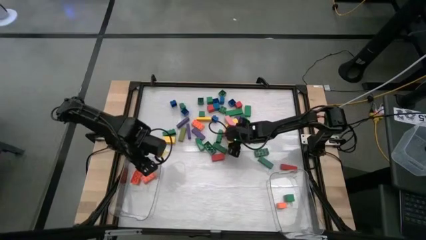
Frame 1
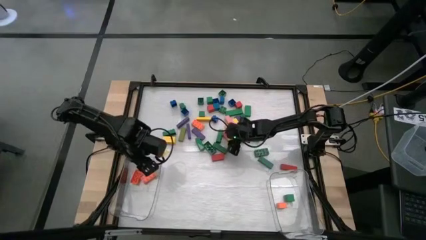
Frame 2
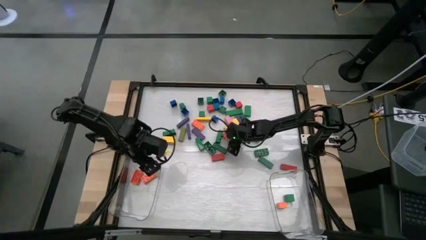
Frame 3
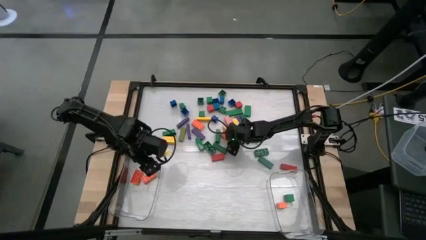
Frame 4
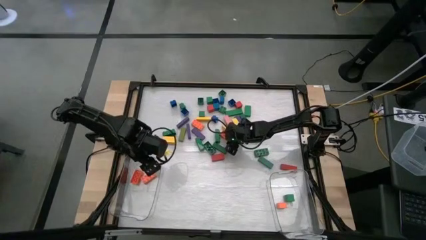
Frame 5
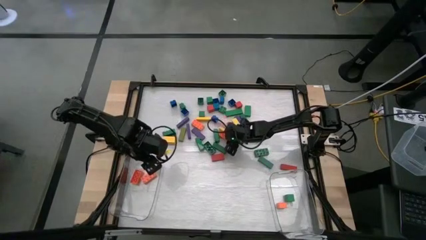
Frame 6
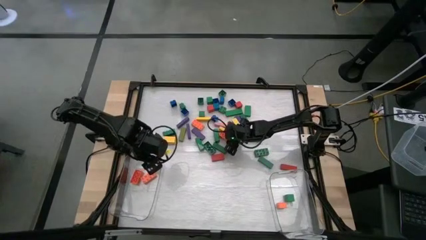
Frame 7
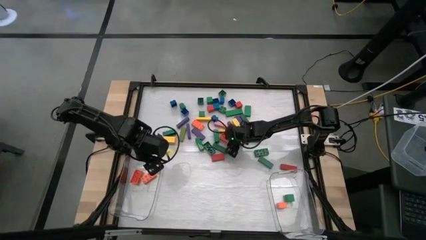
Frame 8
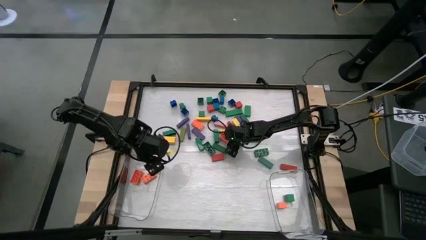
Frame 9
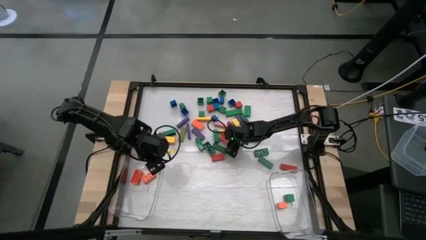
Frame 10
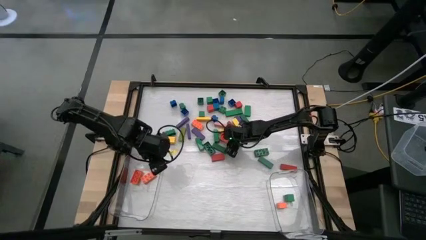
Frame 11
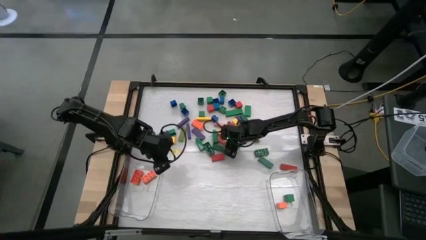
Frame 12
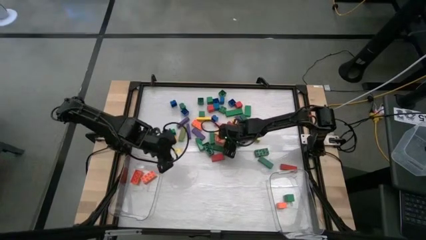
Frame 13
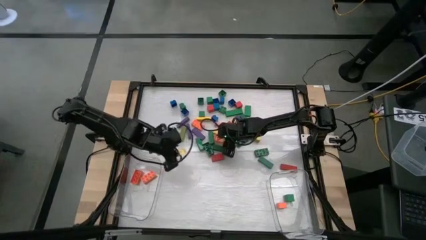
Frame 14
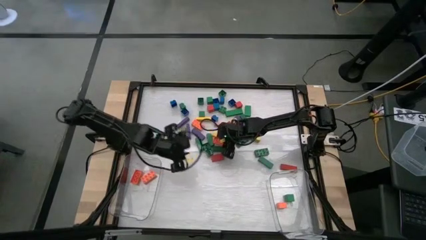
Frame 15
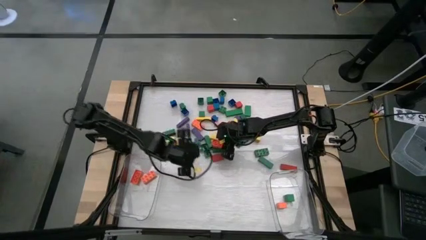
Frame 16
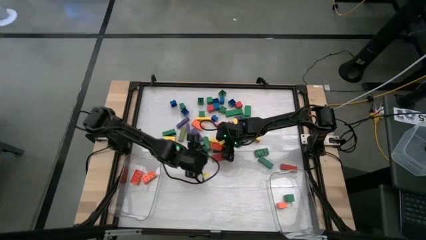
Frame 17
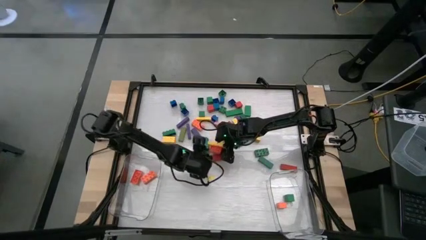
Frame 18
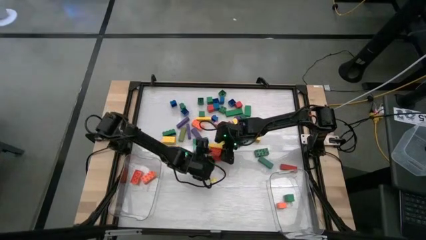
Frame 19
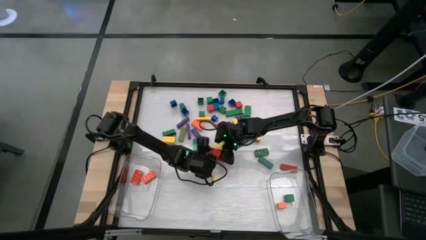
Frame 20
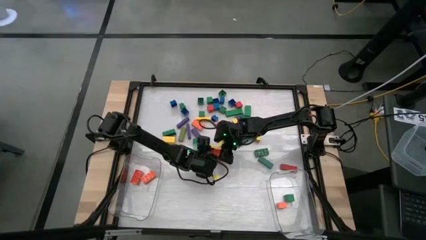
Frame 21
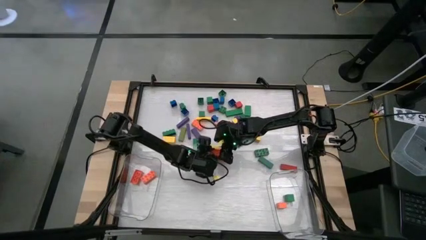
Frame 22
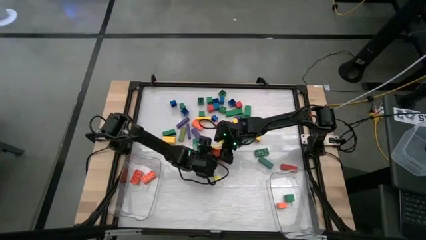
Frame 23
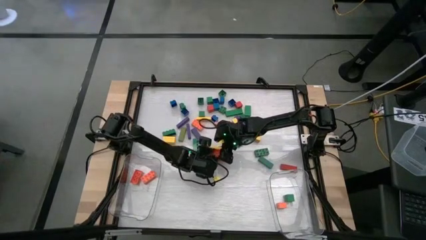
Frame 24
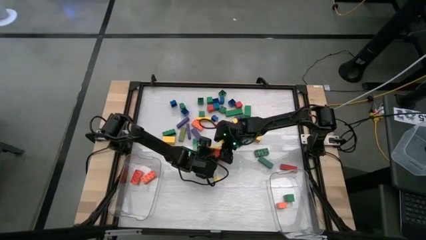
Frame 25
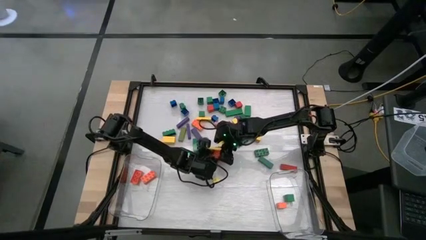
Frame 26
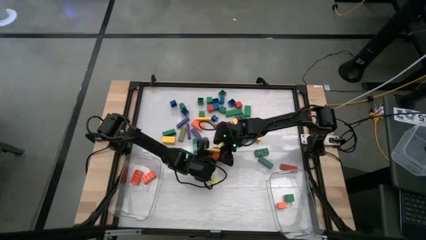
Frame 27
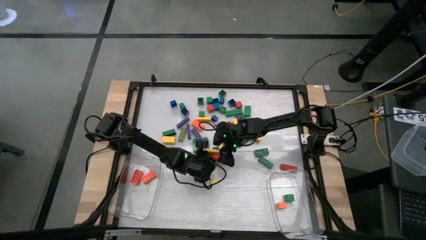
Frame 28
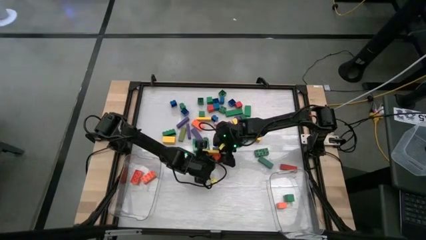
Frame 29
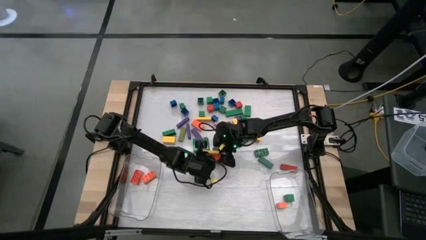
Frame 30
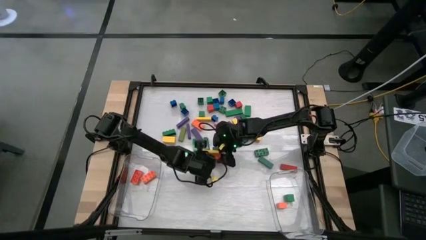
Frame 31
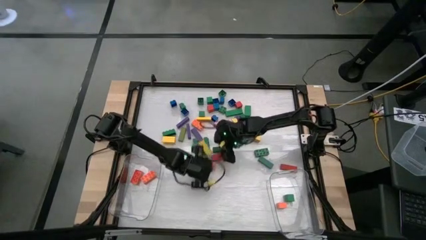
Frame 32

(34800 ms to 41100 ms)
Task: Sort blocks by size
Put the large orange game piece into the left transparent bin

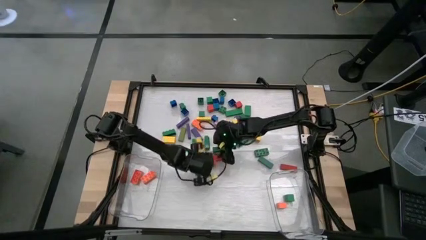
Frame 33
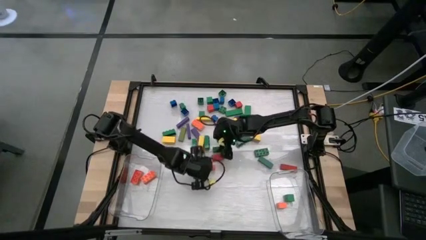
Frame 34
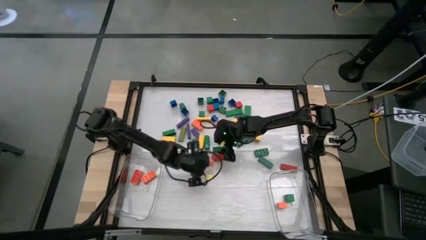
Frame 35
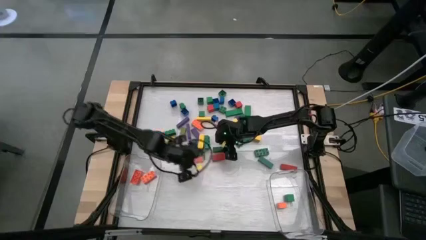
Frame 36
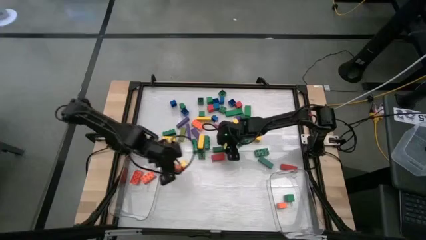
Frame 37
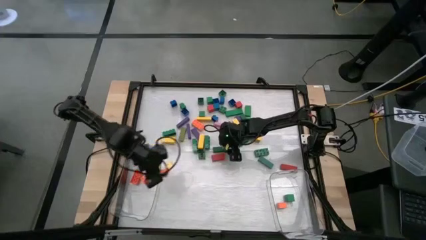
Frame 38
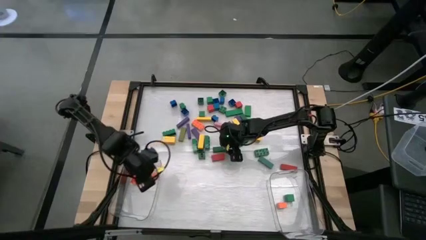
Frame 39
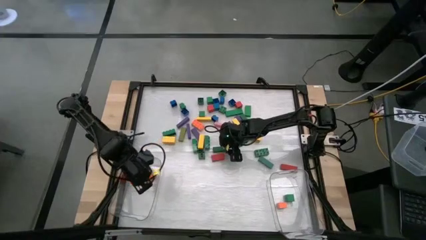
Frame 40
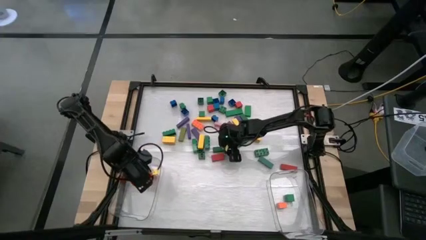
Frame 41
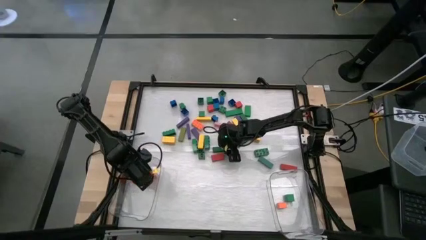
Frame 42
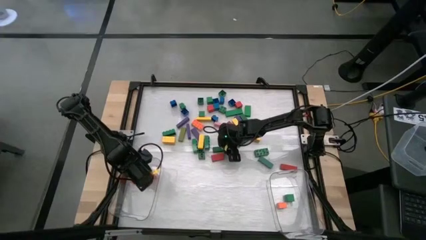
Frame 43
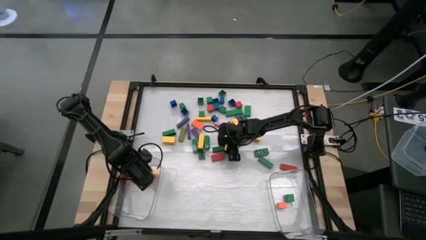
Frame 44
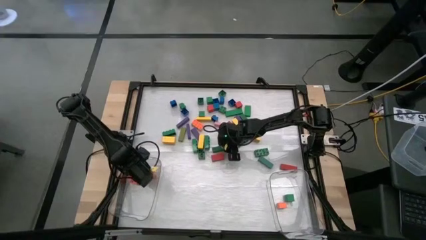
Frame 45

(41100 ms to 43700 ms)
Put the large orange game piece into the left transparent bin

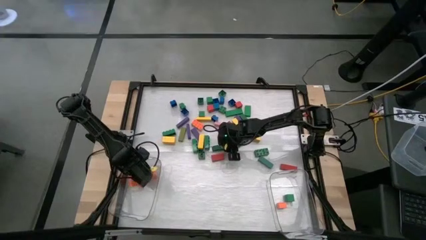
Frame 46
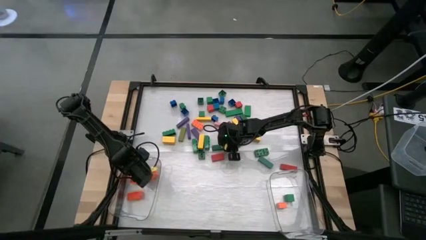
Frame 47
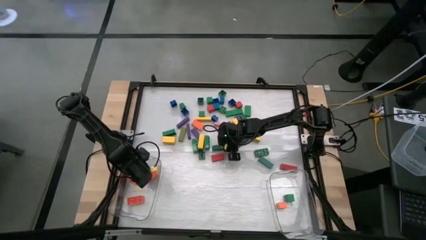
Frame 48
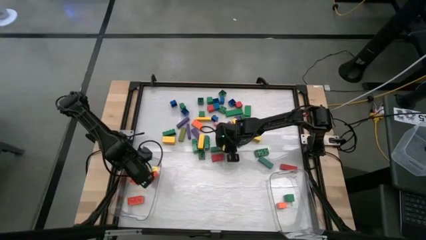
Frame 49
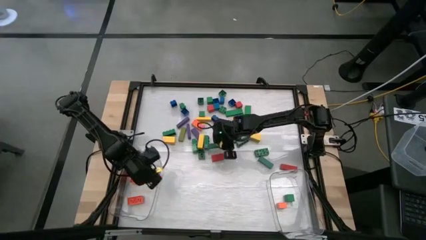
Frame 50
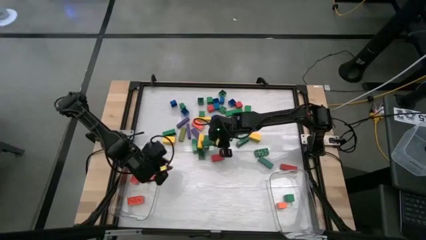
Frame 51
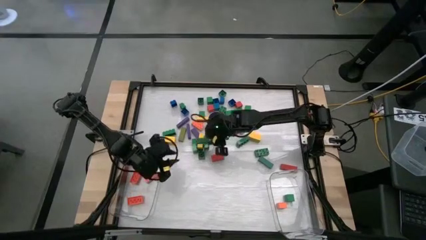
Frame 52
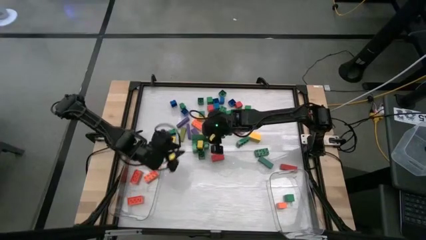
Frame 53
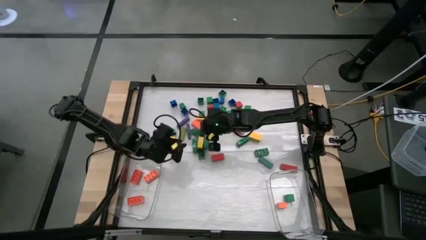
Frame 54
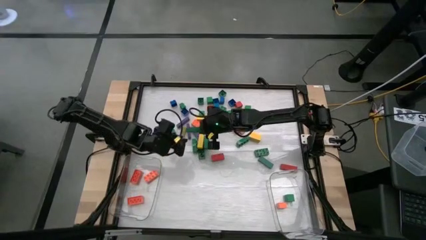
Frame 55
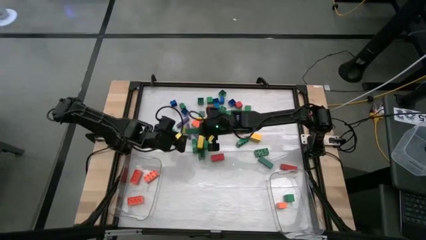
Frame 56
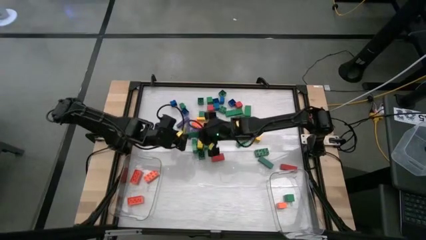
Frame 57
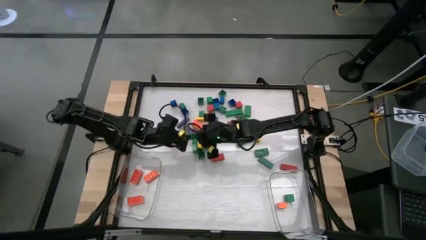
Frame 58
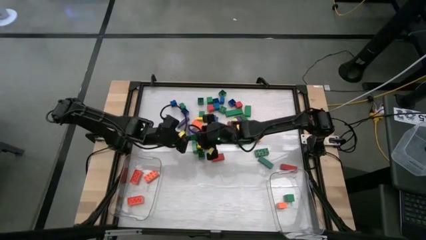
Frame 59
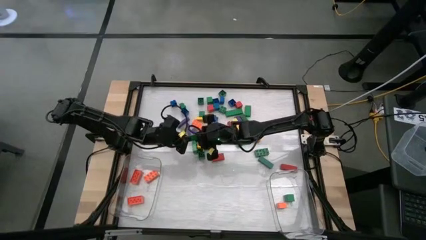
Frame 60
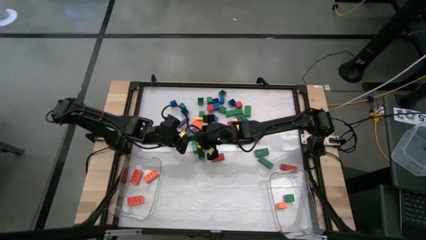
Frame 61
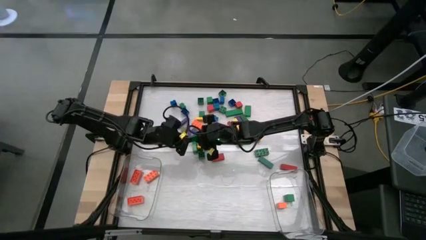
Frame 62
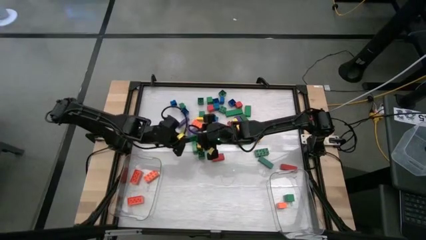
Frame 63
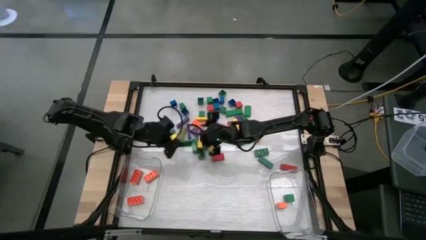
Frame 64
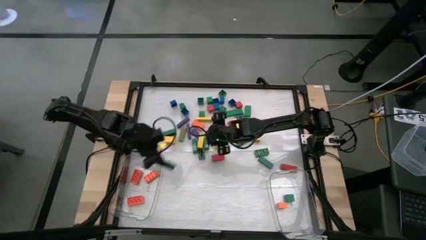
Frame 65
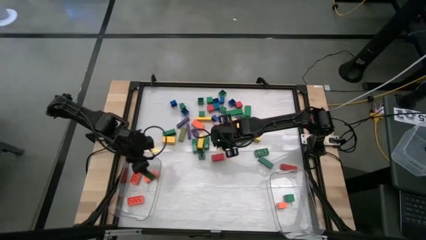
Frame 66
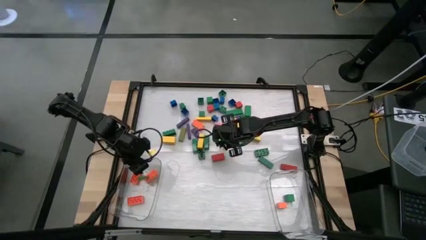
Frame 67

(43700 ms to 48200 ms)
Put the large green wooden block into the left transparent bin

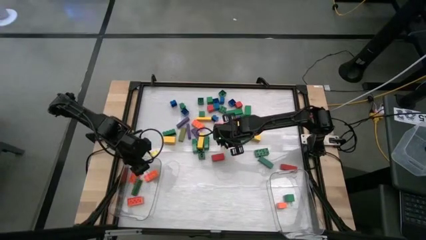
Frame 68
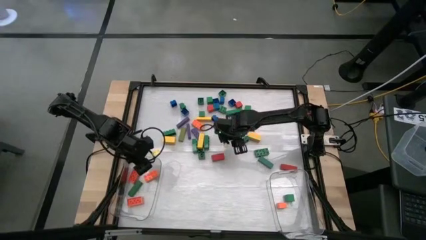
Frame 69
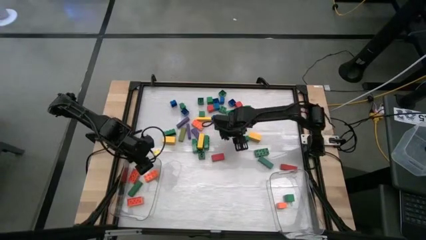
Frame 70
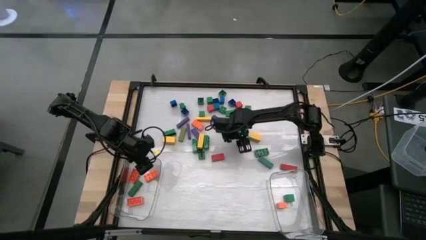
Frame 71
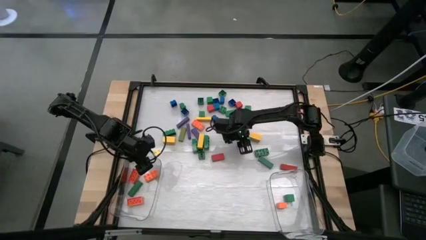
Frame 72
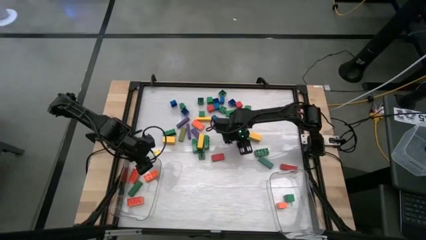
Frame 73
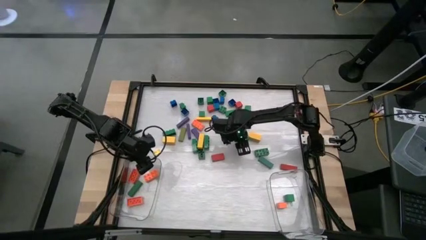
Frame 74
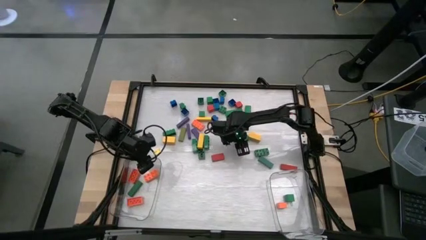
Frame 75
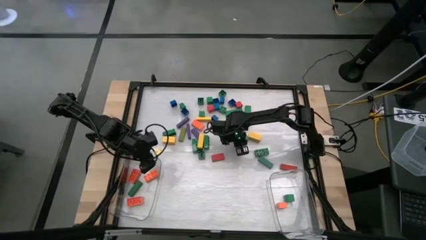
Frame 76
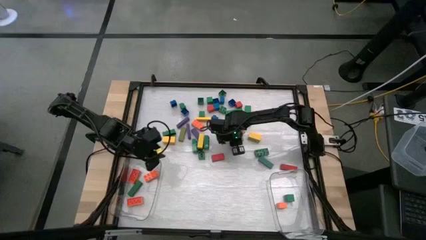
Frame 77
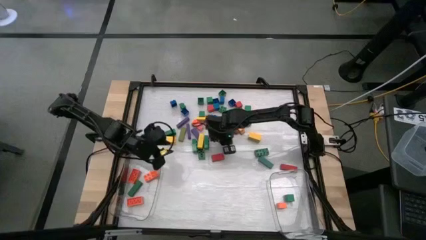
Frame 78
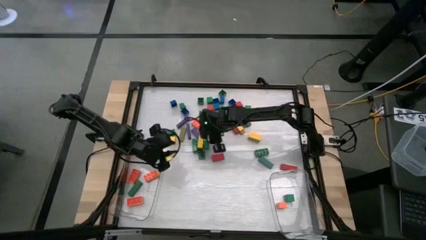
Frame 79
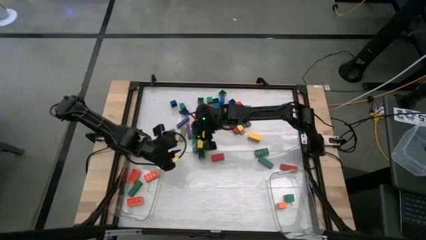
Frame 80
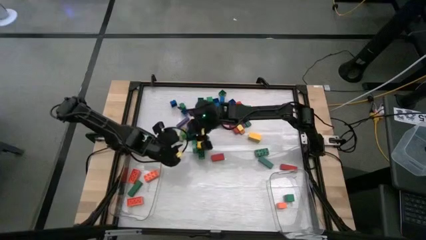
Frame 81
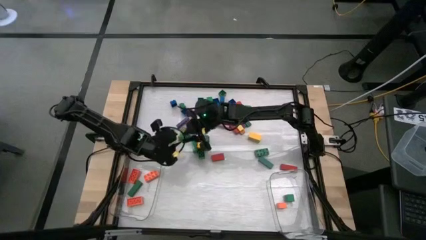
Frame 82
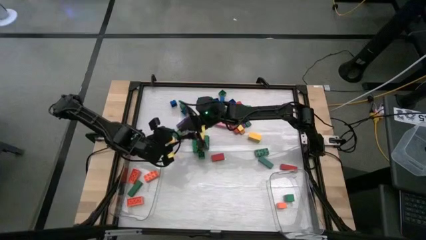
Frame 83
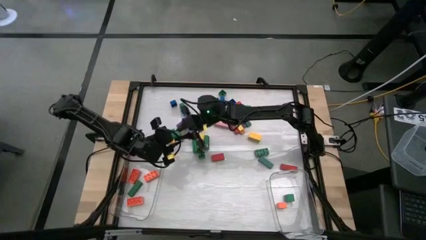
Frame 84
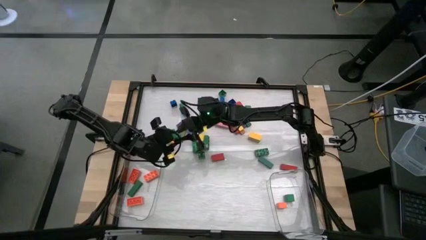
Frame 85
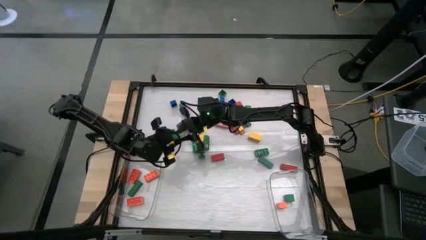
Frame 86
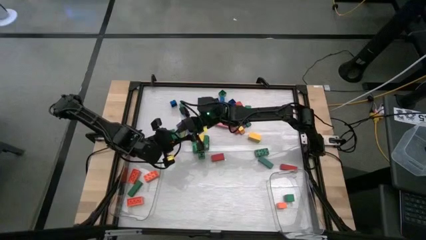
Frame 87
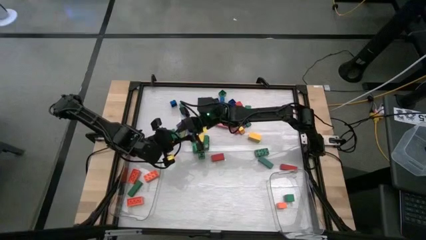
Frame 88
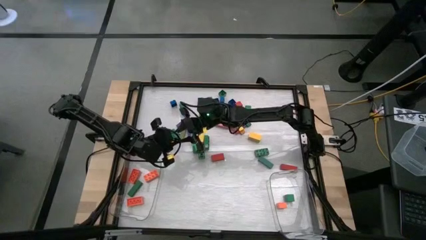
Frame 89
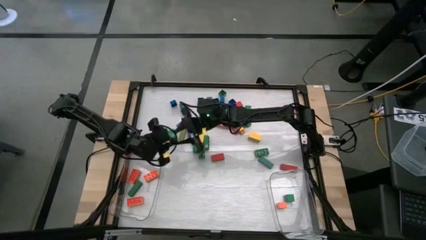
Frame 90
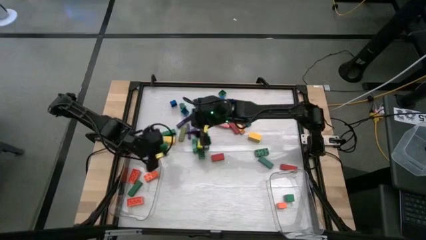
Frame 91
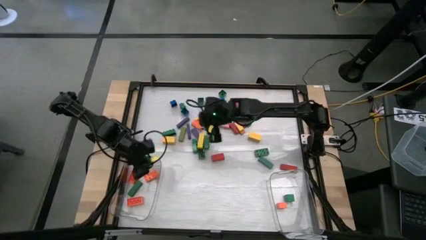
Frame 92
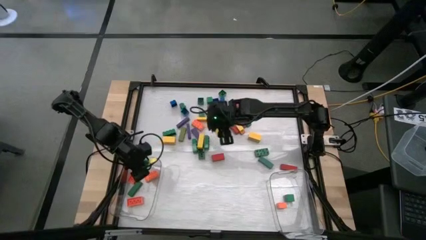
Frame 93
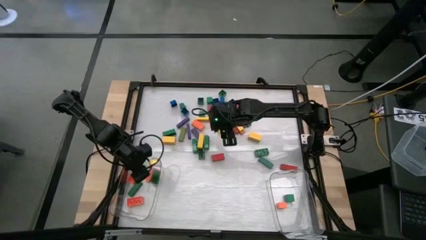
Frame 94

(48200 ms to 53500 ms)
Put the large green game piece into the left transparent bin
